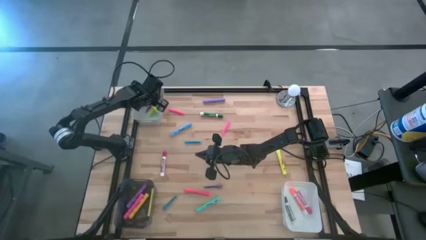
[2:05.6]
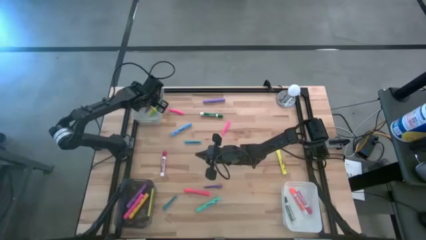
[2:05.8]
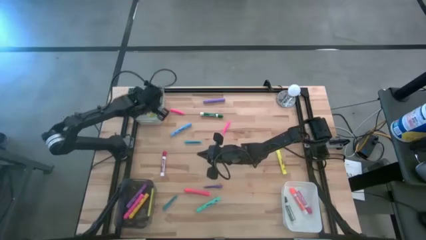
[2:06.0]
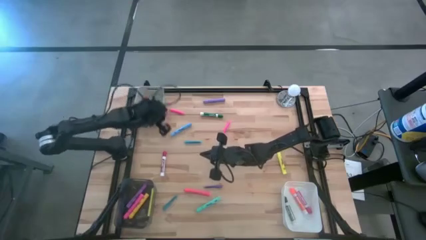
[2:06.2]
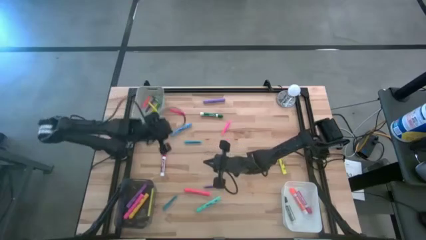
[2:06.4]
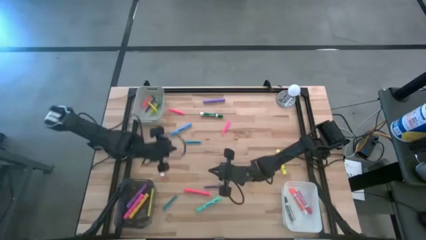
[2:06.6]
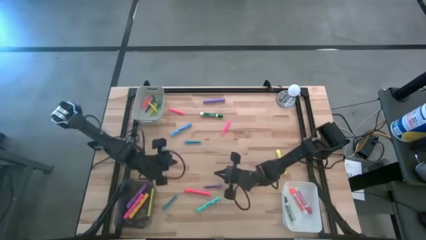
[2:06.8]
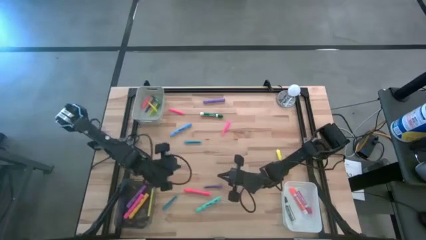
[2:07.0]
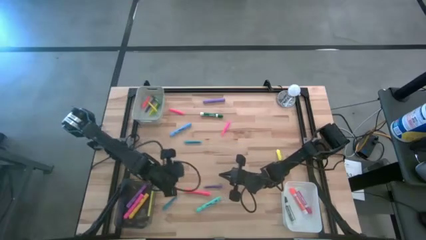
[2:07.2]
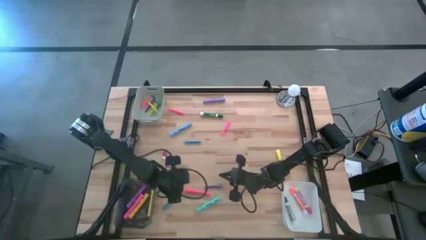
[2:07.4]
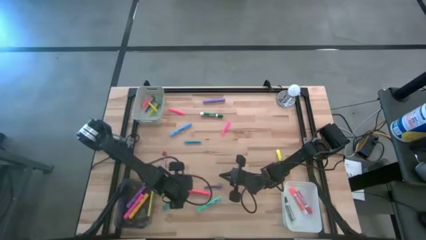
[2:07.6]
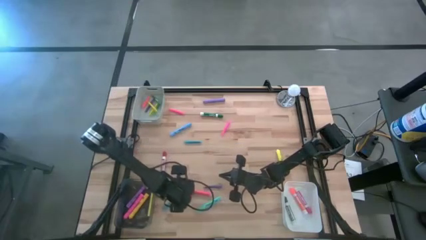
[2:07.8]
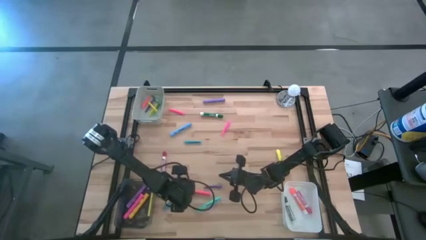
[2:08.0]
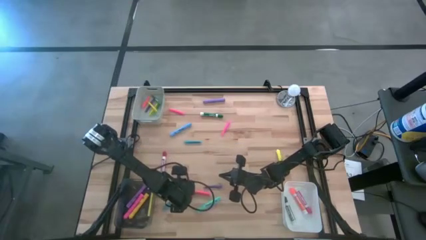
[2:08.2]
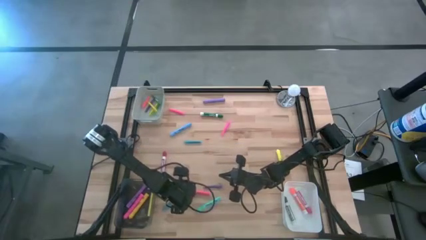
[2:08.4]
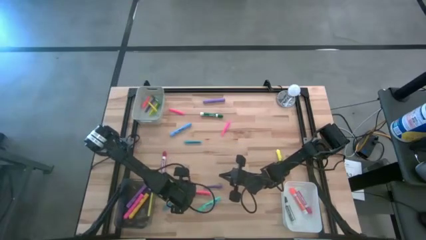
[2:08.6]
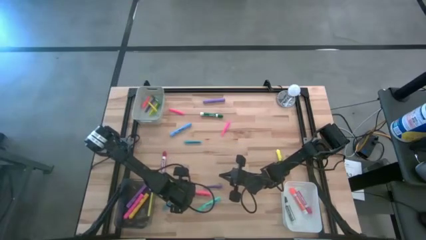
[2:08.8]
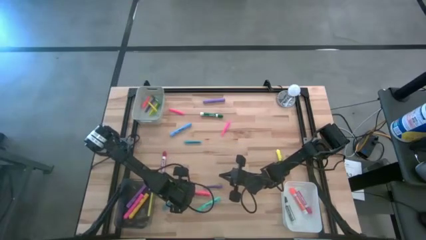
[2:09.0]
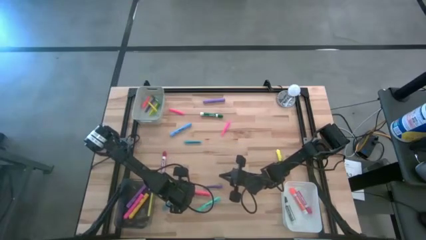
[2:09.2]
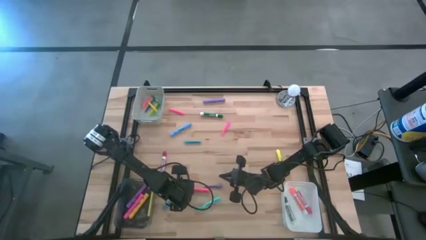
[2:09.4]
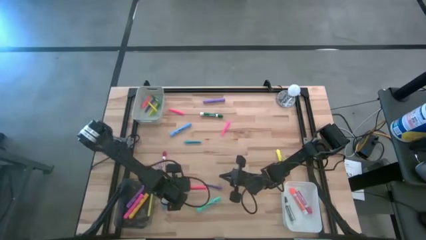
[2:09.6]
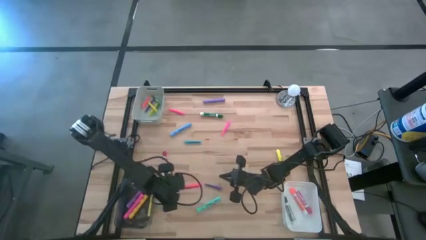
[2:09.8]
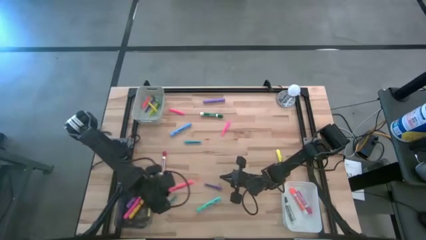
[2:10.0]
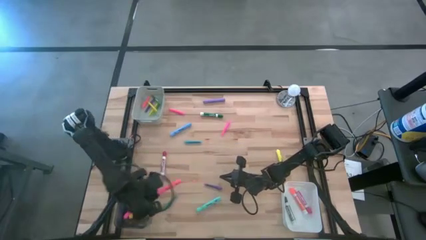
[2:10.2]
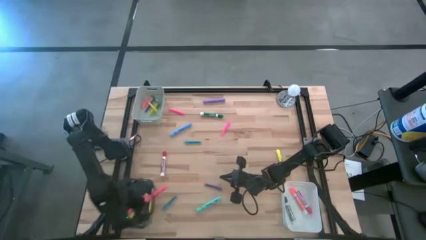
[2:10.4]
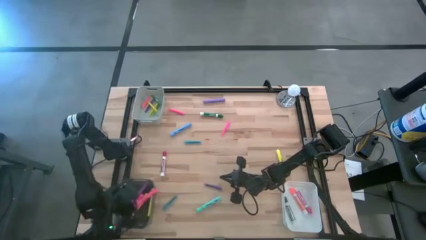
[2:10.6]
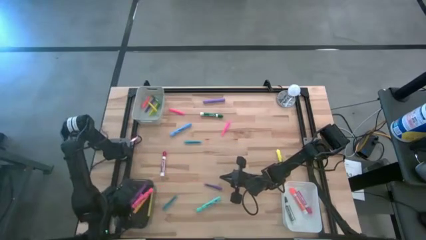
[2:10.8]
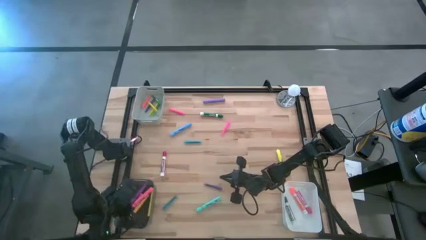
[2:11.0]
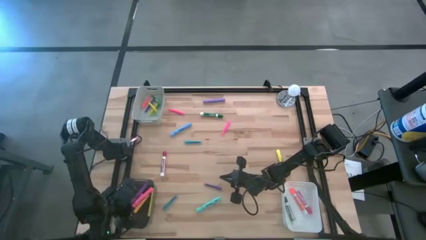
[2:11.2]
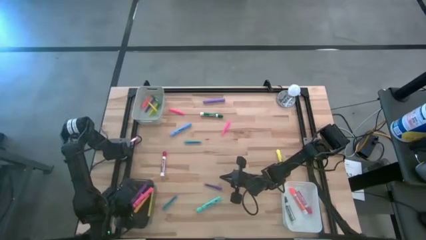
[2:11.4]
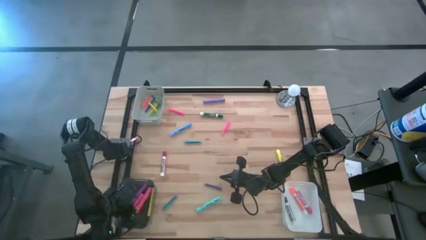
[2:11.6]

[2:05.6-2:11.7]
Task: Pick & Place Markers
Put the red marker pen into the black bin

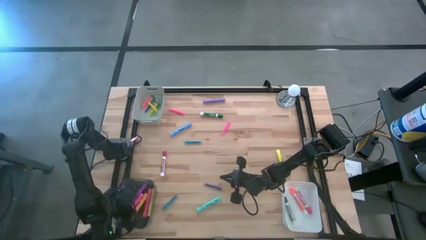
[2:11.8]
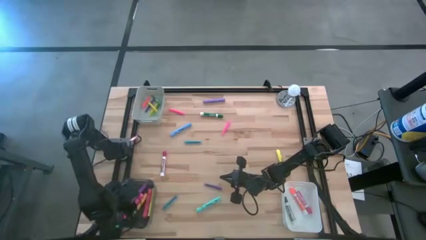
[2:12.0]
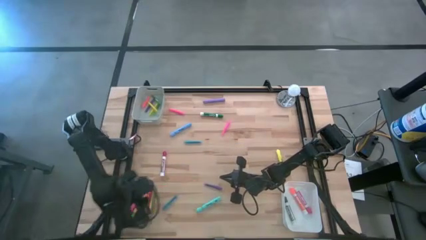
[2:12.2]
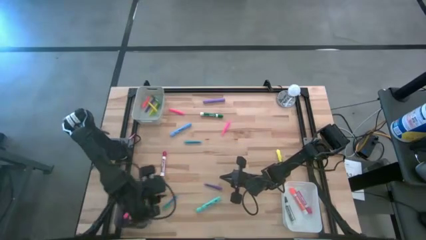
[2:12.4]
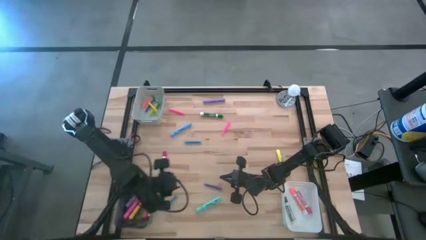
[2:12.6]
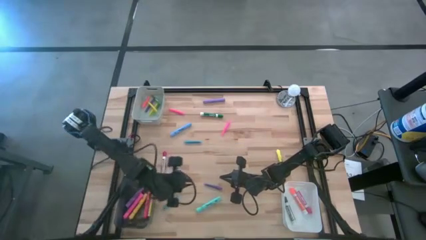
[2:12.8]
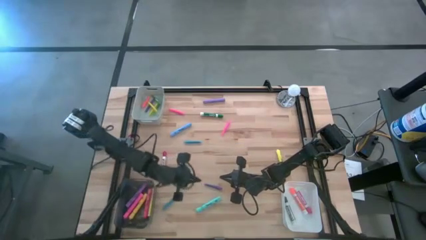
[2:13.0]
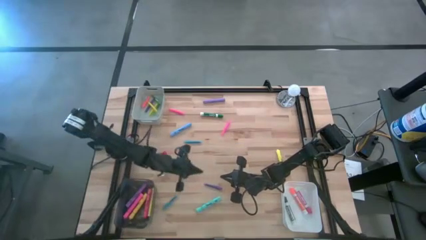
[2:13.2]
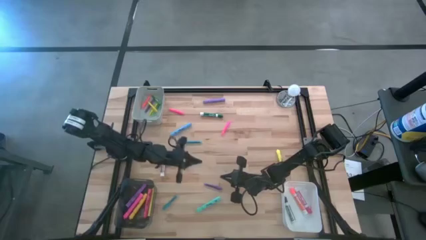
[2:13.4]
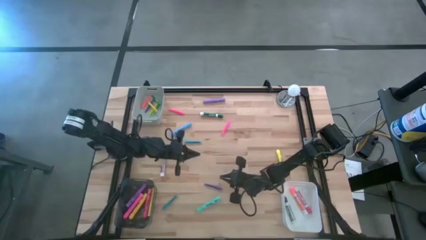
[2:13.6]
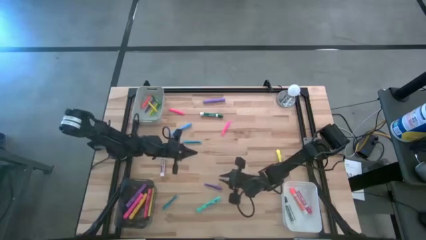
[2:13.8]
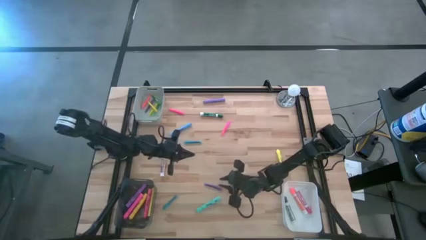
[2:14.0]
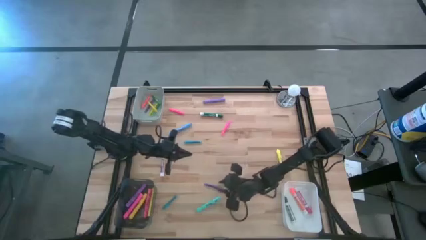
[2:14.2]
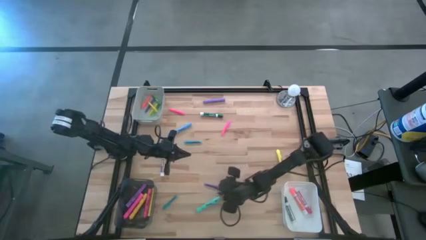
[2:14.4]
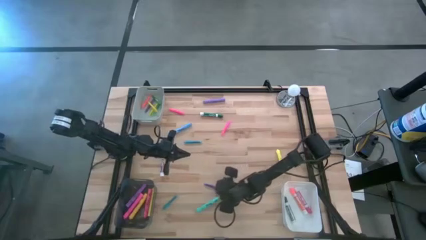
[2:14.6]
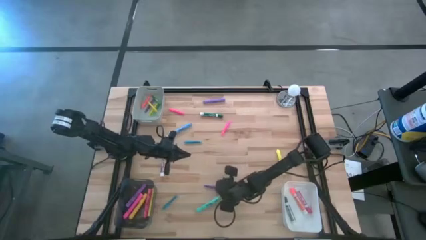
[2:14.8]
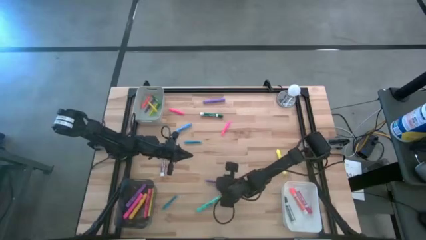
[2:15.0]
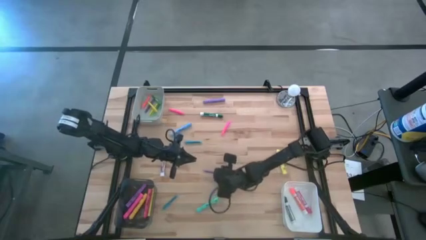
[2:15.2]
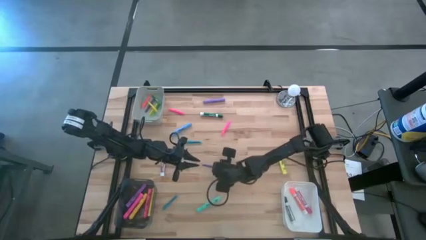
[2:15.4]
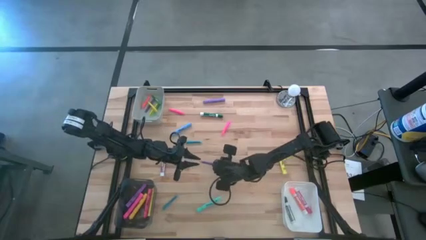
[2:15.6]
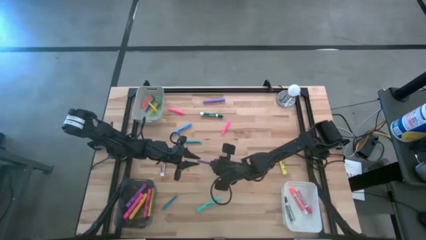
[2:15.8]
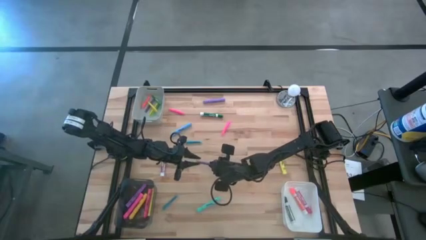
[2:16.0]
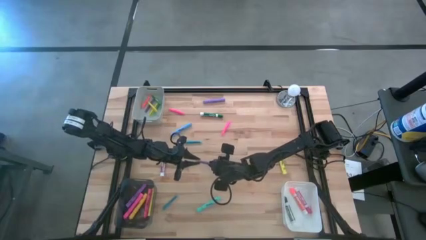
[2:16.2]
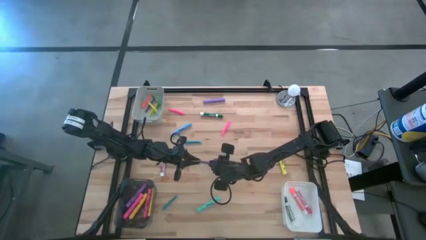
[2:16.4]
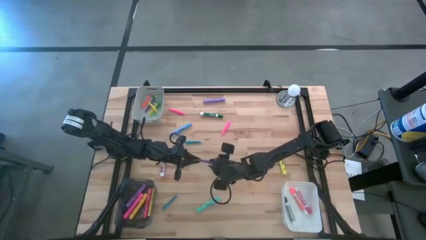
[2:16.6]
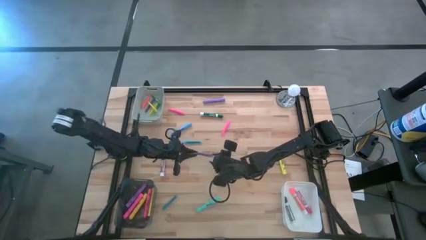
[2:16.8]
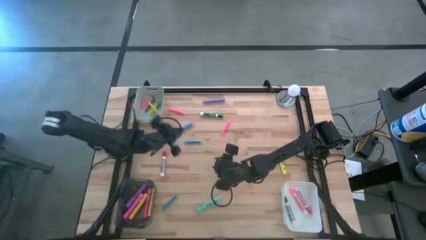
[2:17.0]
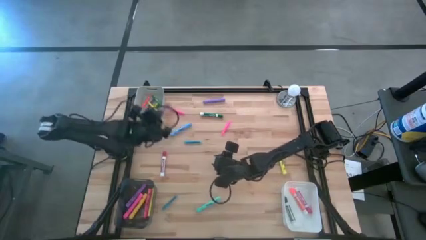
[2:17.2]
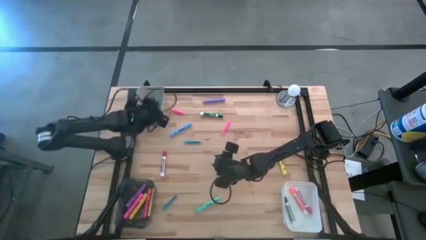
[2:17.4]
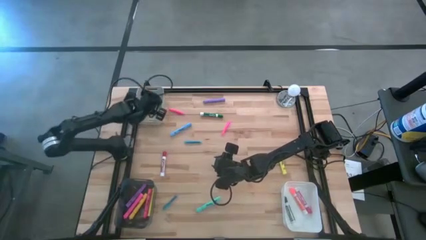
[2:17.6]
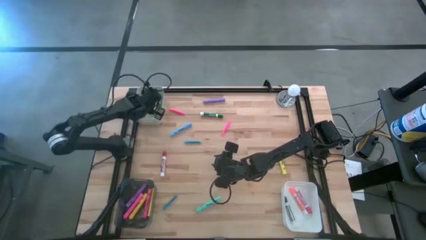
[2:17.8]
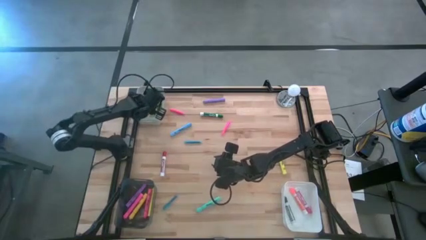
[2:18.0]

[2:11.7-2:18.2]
Put the violet pen into the gray bin

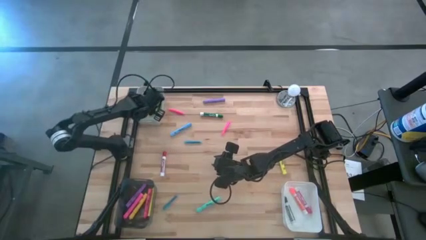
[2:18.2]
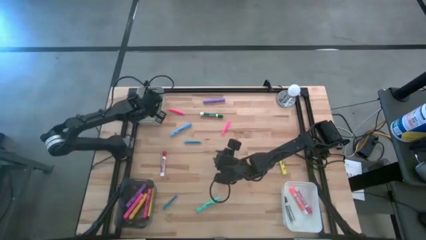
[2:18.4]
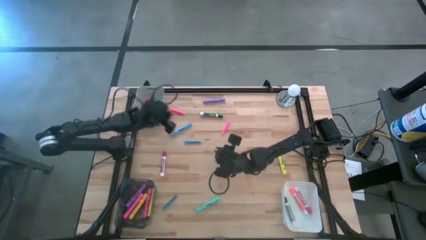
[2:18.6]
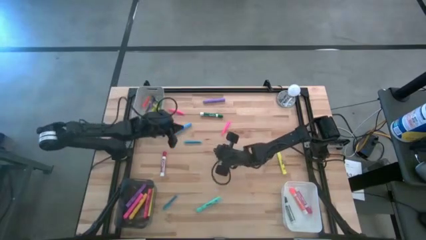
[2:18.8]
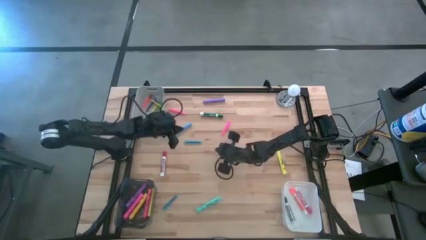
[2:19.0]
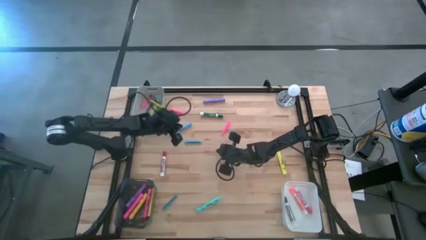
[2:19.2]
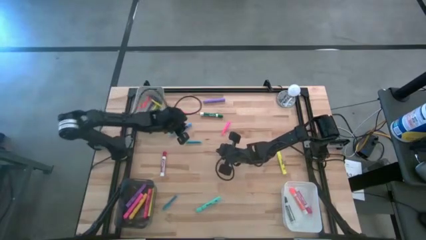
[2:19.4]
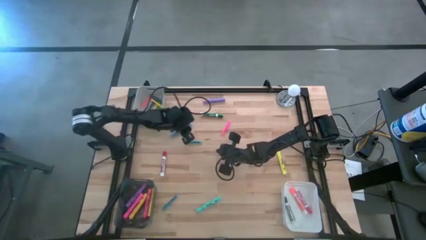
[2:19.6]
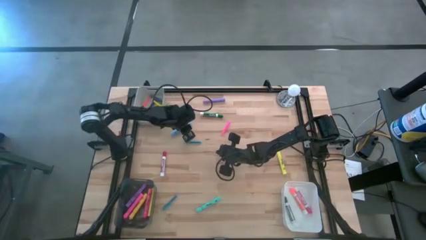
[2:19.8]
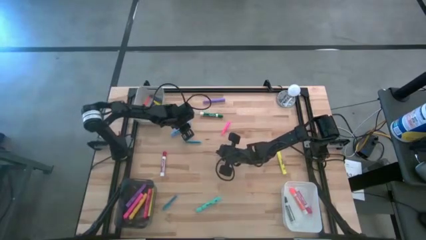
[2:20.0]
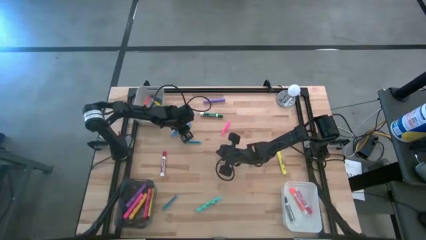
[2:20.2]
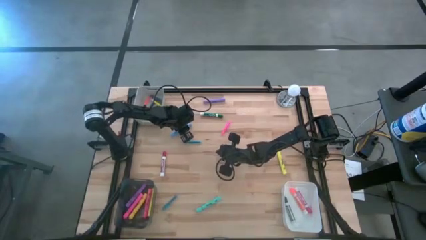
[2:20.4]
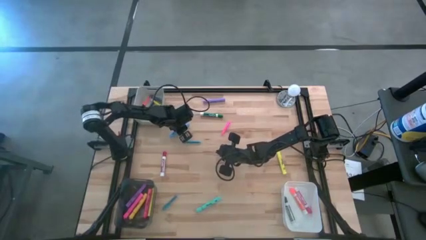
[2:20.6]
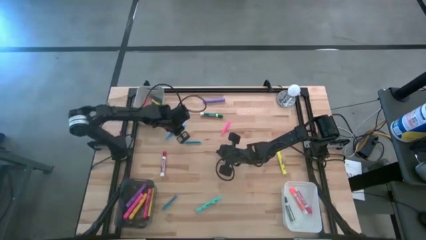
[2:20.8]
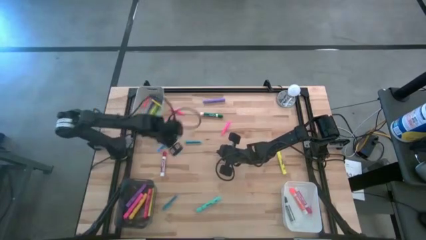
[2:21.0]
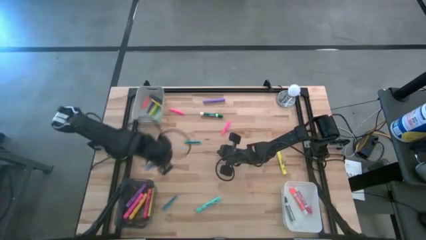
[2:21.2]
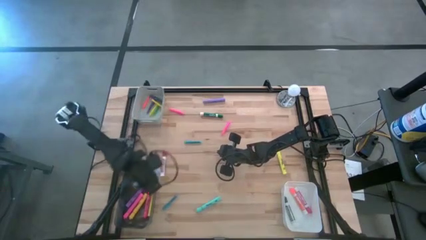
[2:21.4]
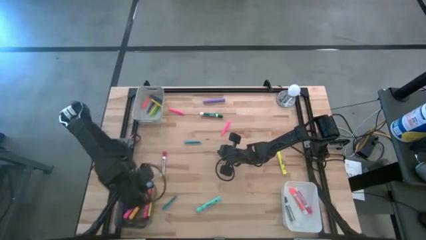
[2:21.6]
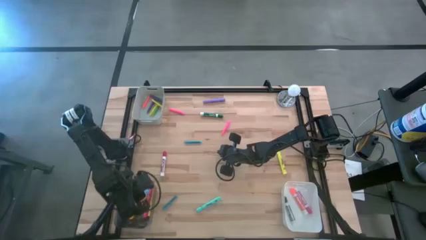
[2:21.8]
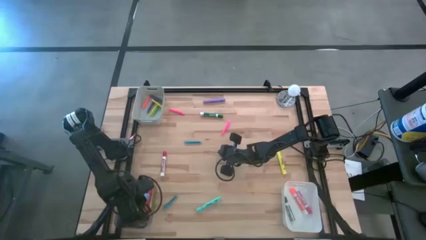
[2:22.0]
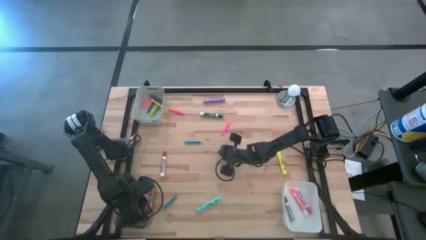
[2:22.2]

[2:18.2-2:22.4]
Put the blue marker pen into the black bin

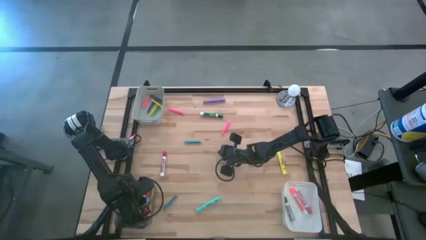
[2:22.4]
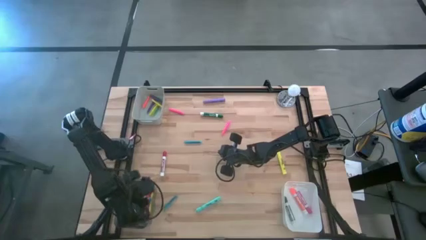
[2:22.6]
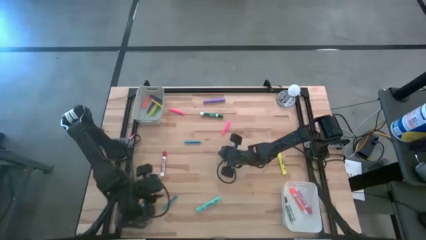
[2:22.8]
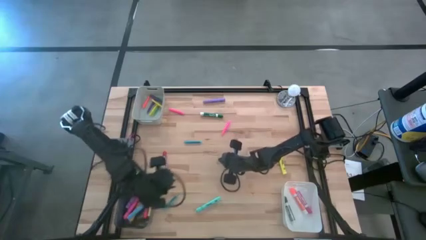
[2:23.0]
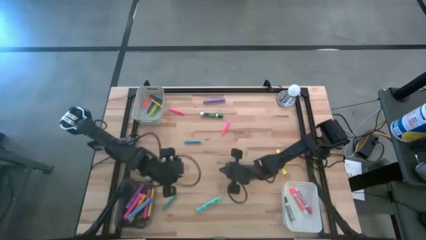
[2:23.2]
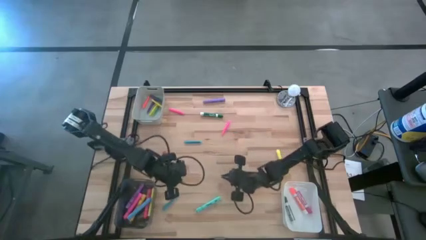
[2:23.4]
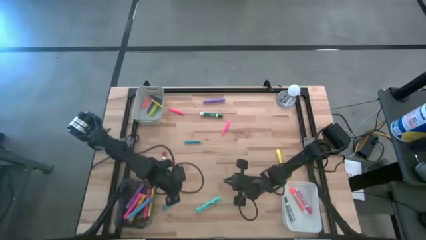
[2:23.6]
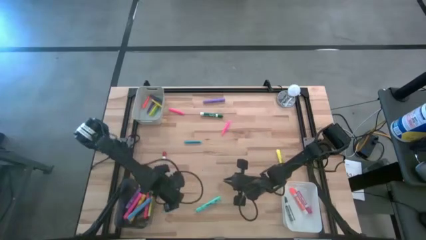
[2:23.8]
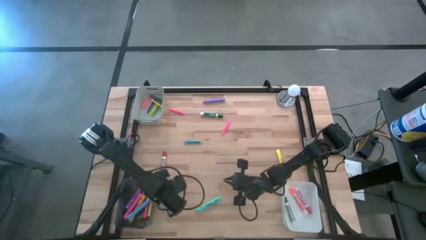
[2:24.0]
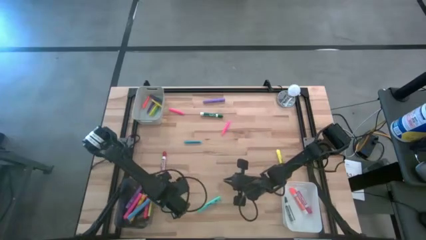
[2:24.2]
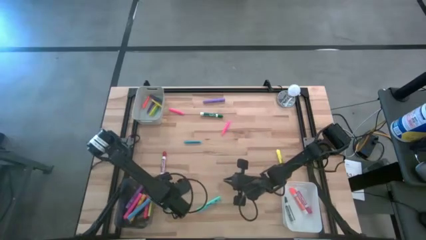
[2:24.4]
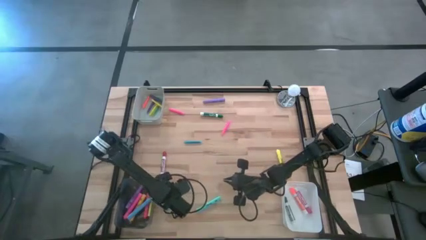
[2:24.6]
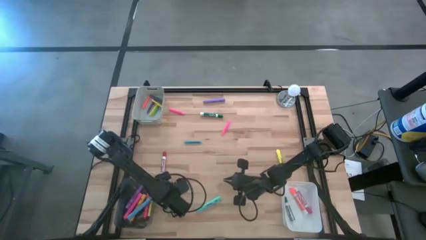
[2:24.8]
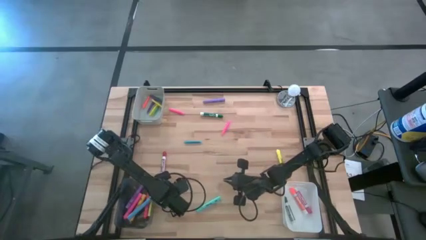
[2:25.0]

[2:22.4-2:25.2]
Put the bottom blue pen into the gray bin
